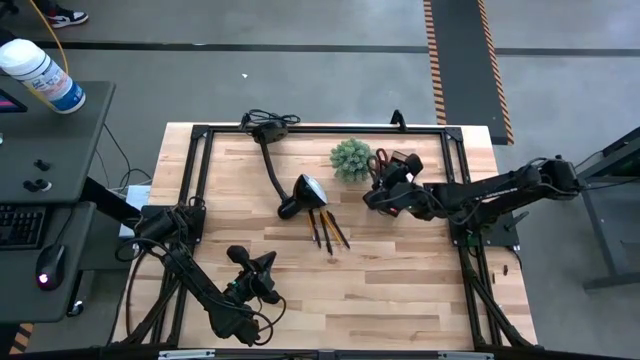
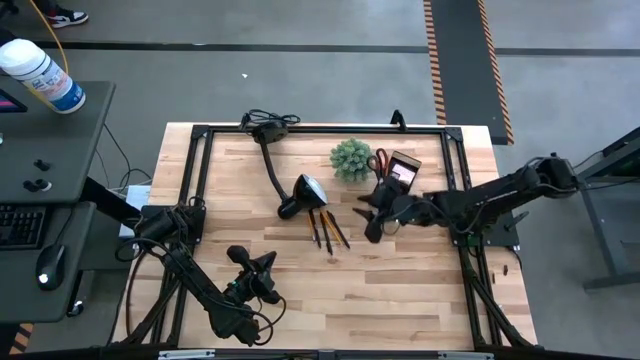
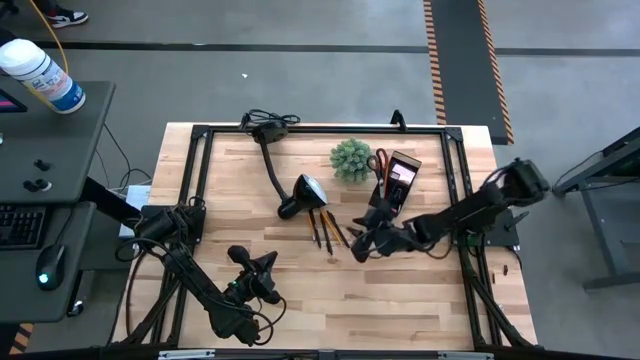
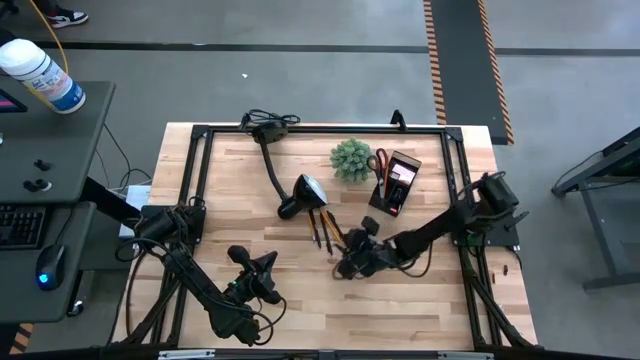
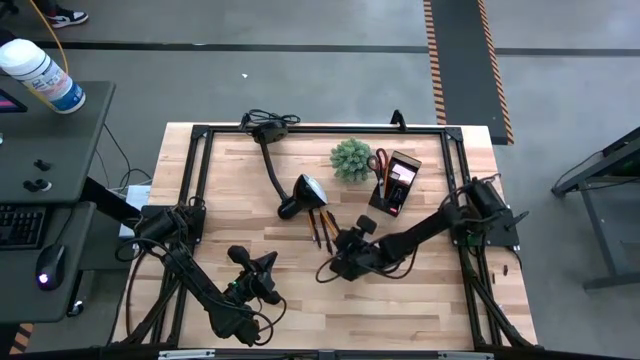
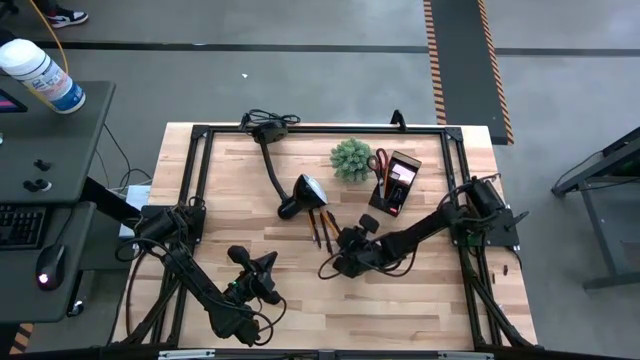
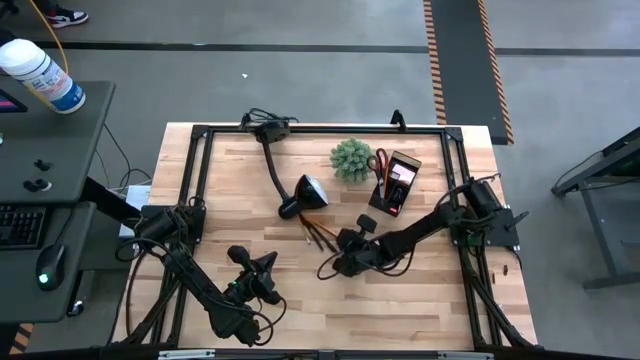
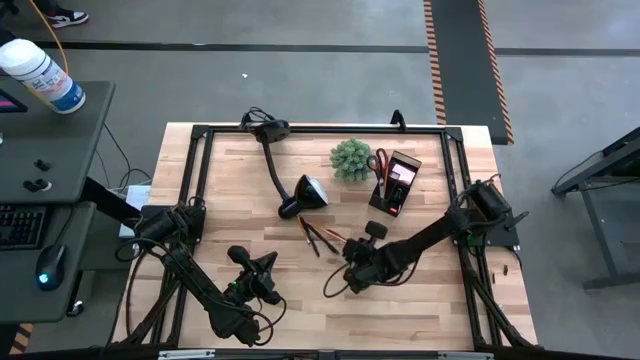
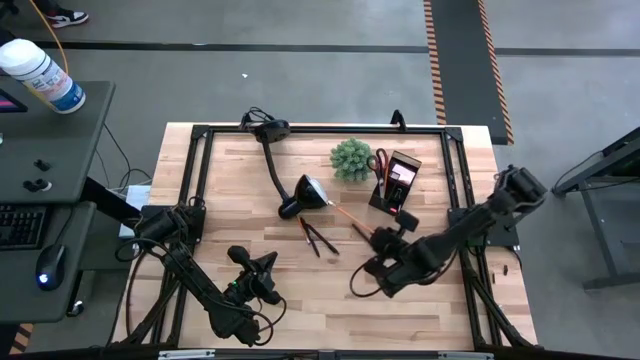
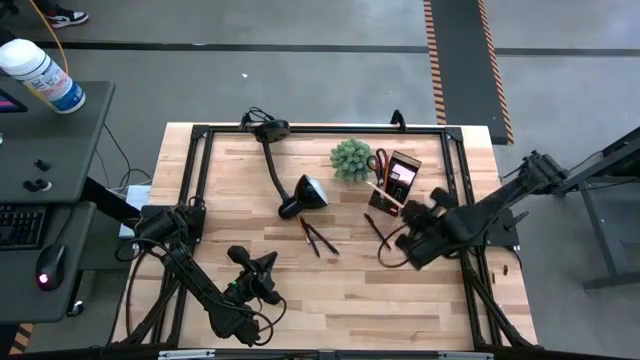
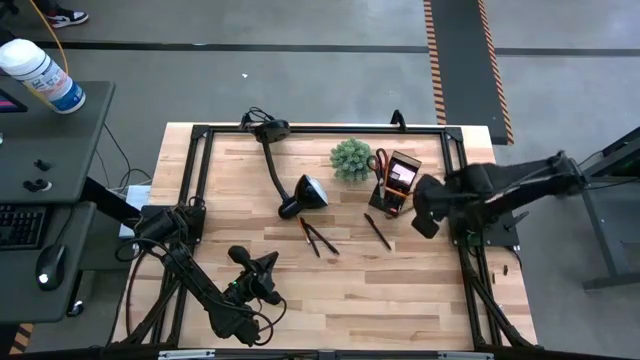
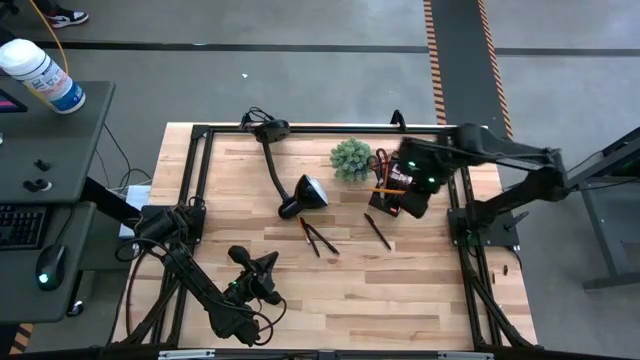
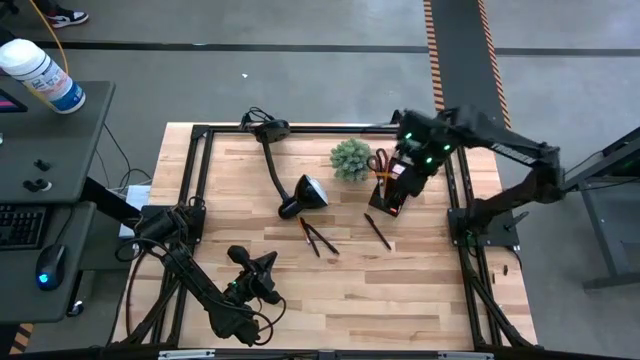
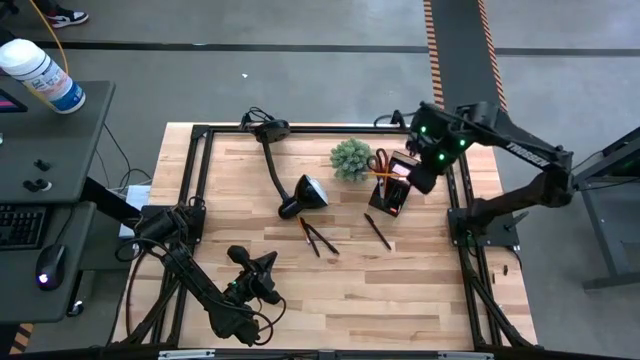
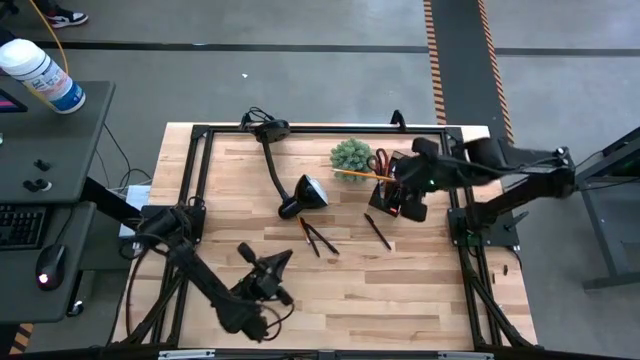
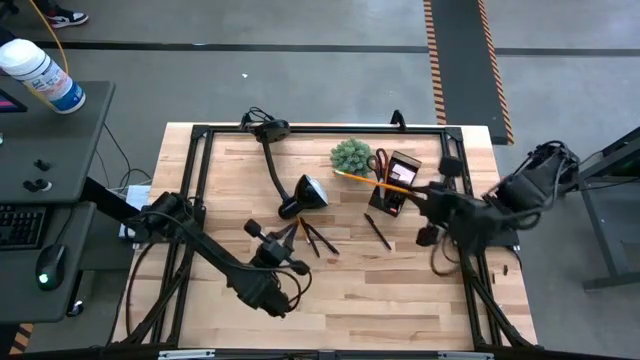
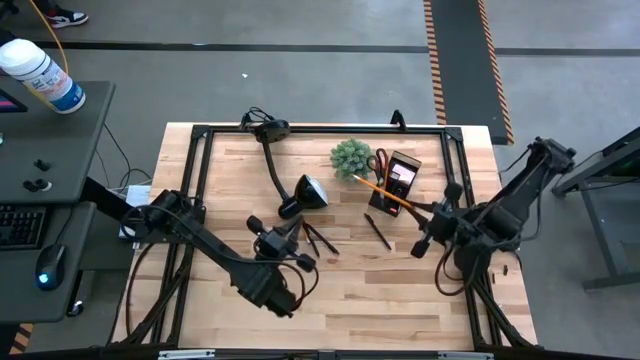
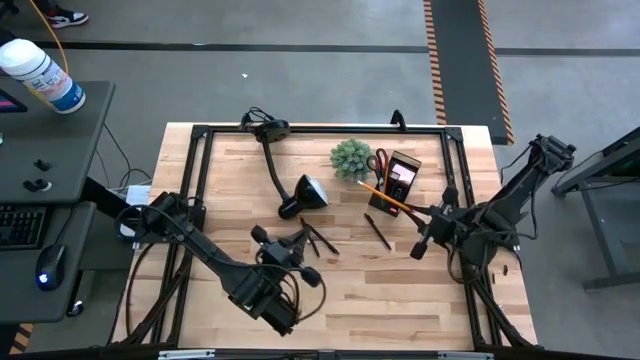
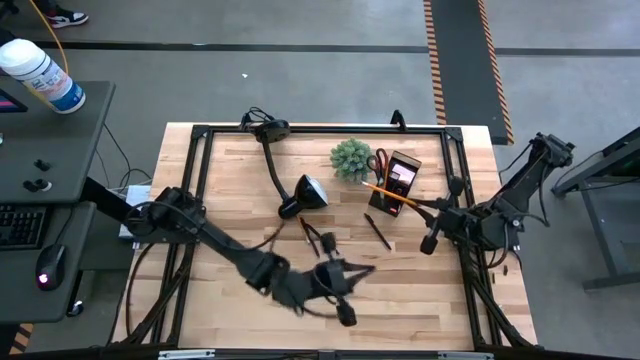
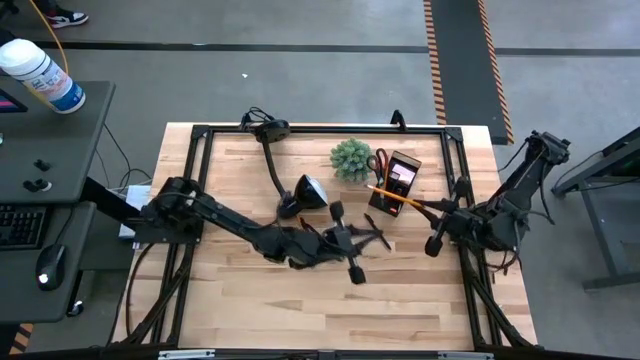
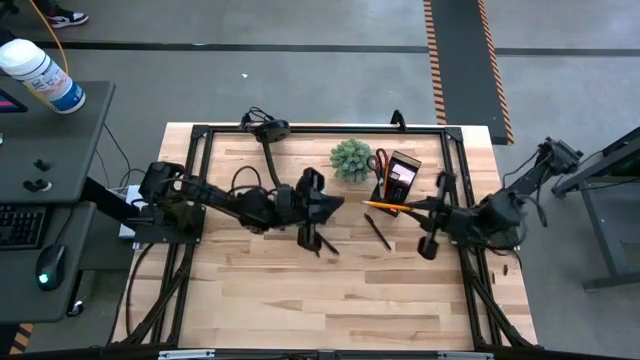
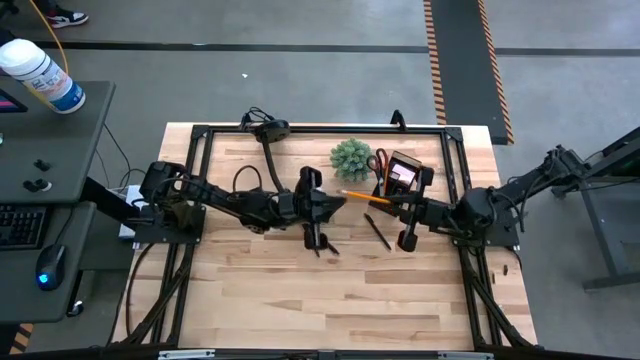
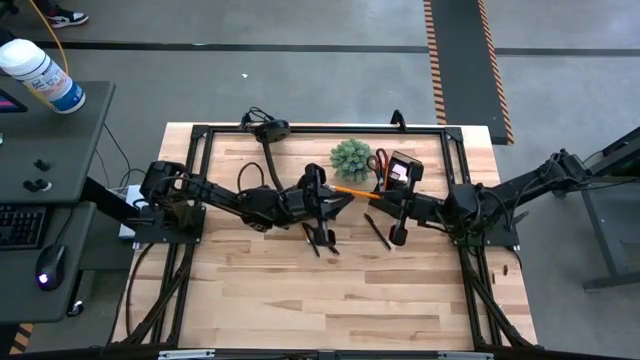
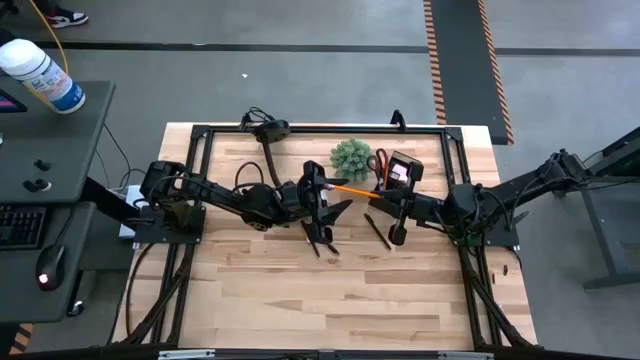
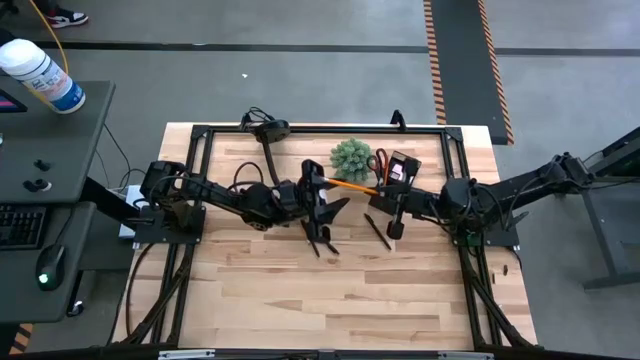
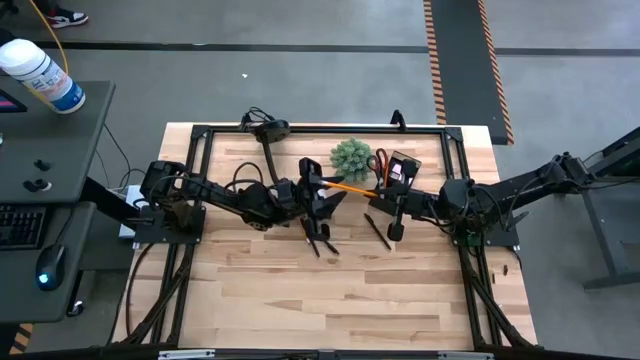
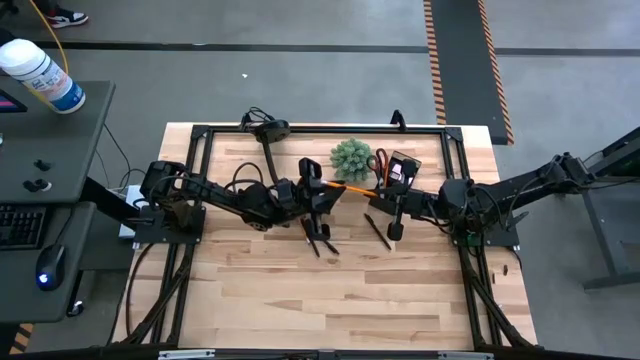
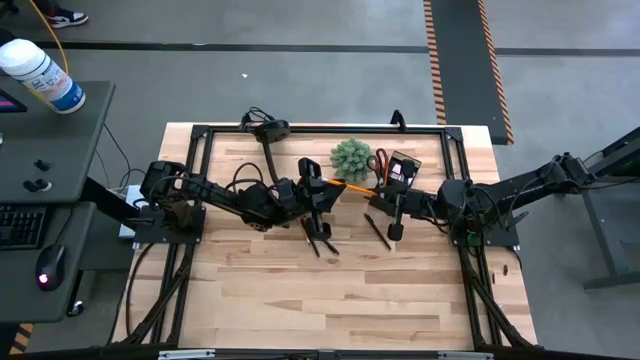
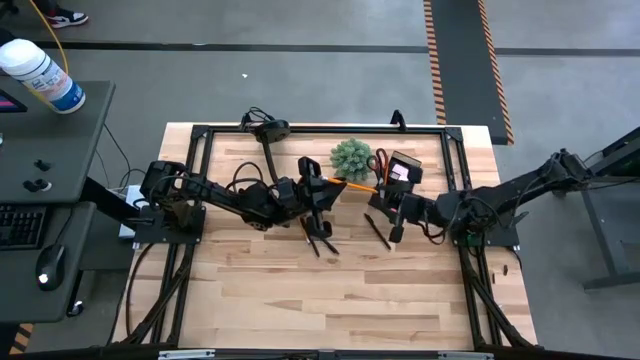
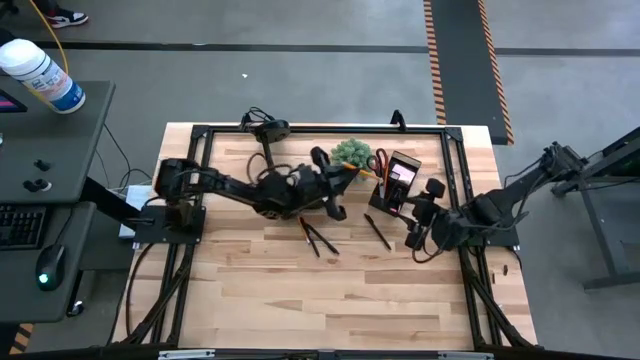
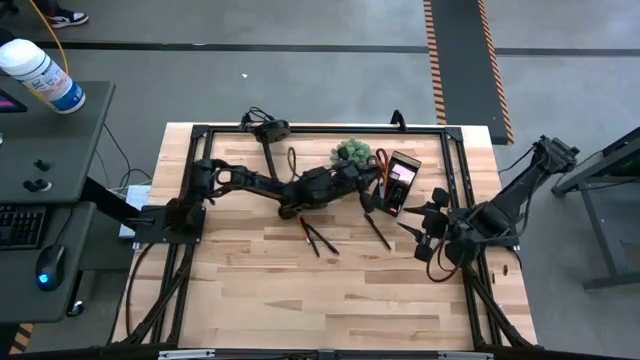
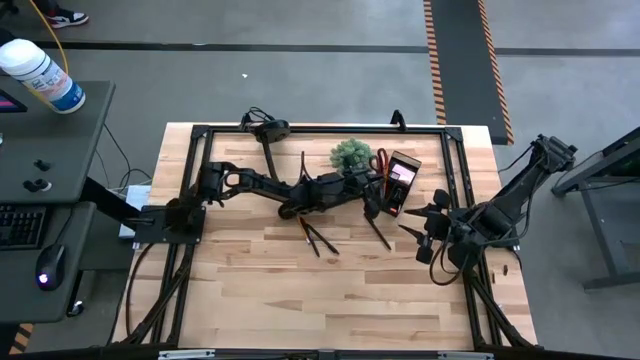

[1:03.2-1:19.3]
Task: Pick and place office supplies into organizer
Put the right orange pencil into the desk organizer

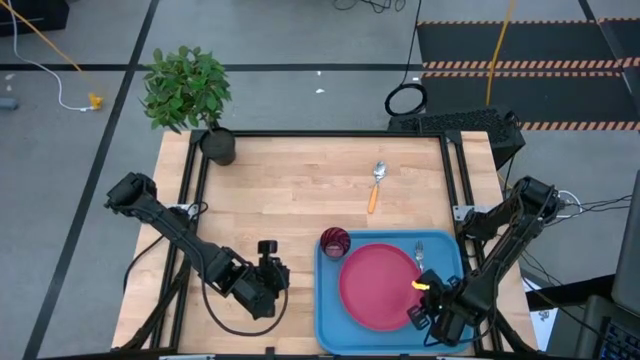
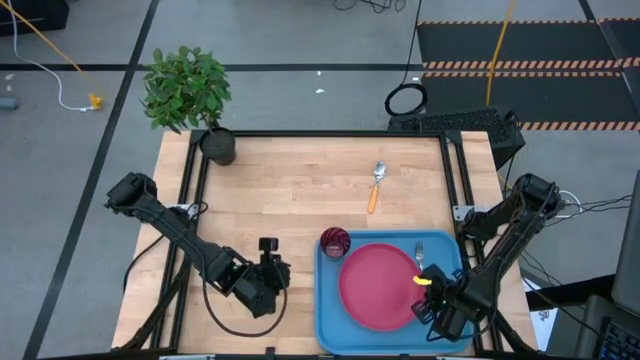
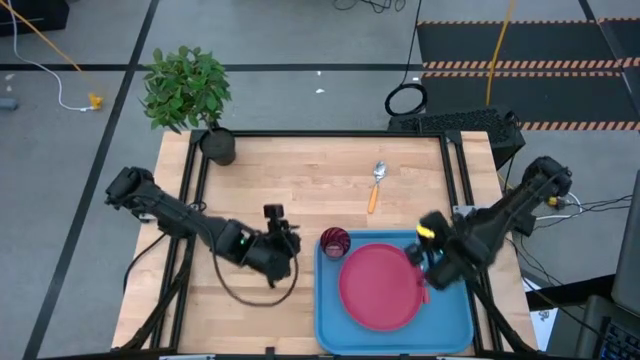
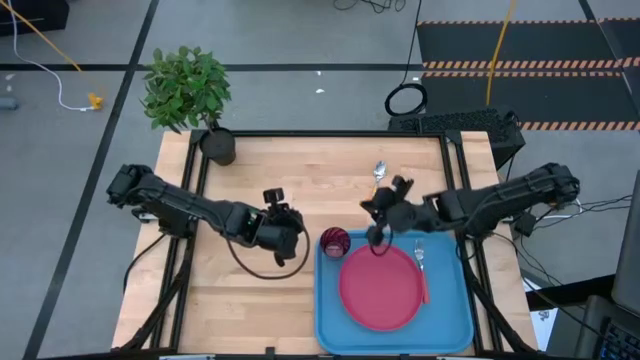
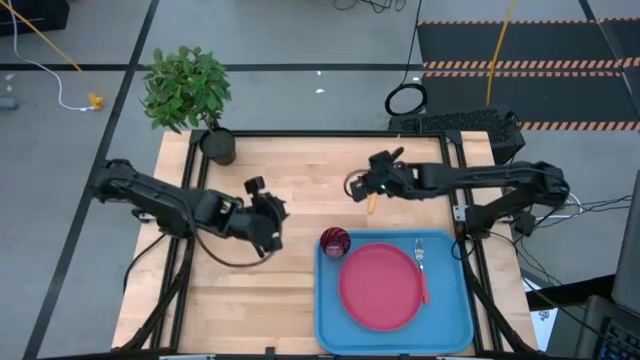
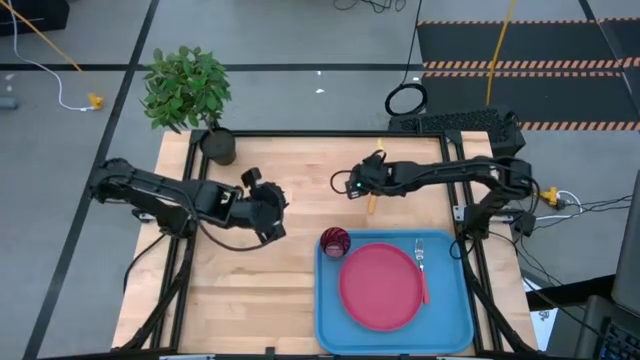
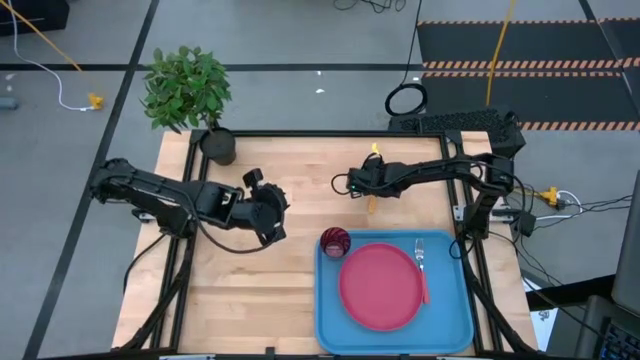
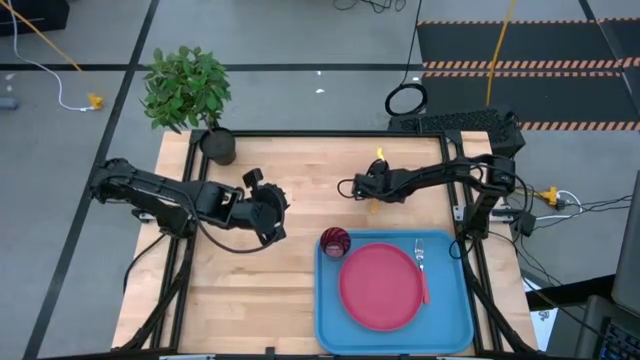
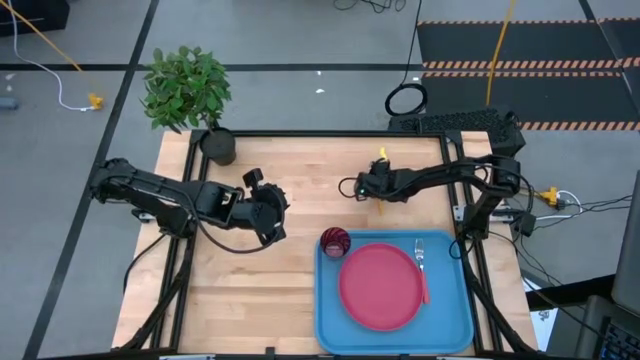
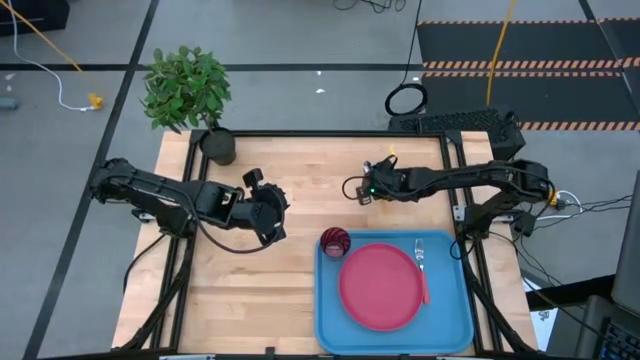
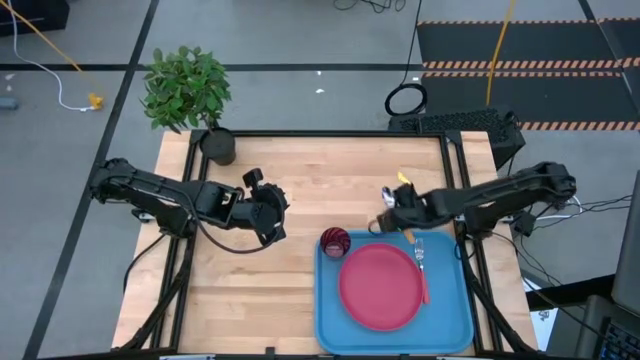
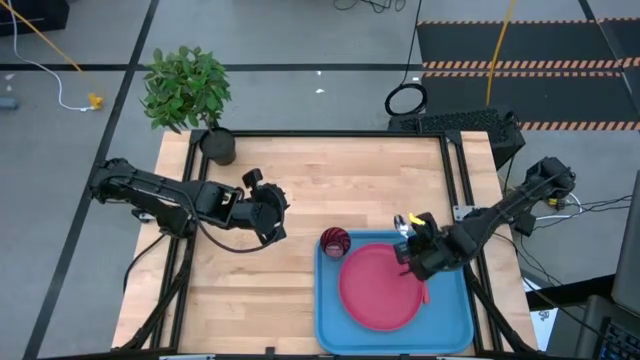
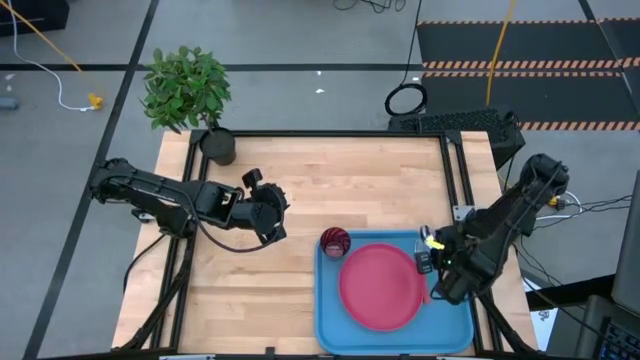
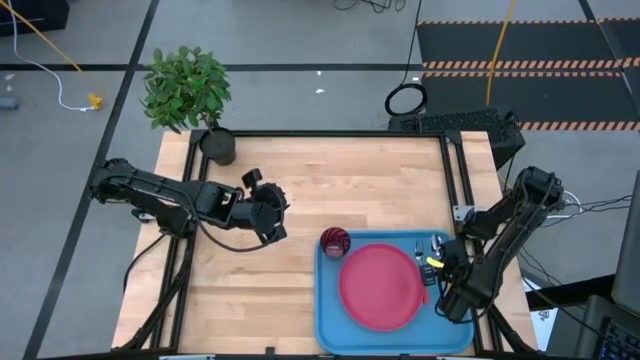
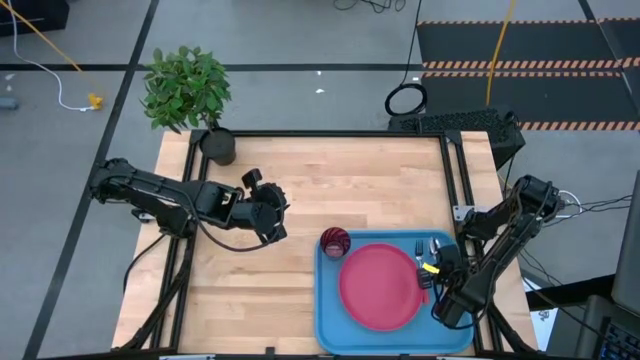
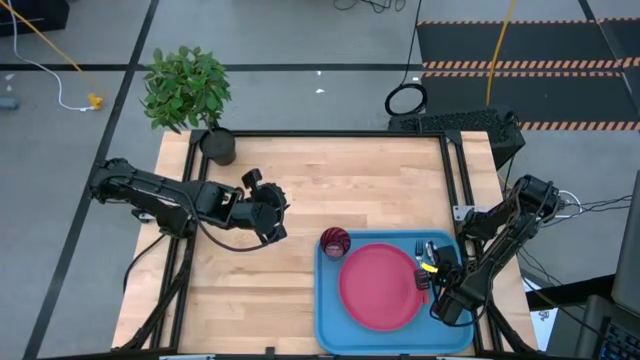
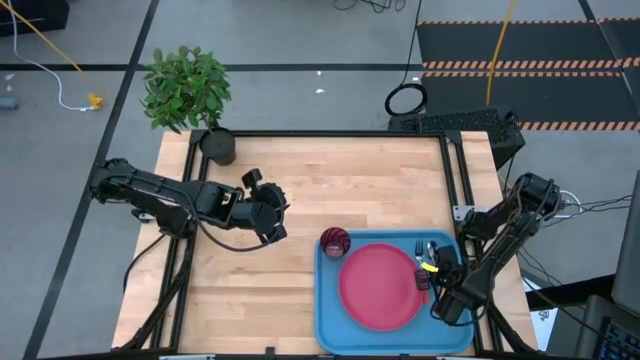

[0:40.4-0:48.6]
Task: Pick and place plate/cup/fork/spoon on tray
Put the yellow spoon on the right of the red fork on the blue tray
